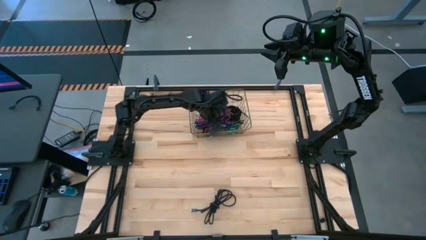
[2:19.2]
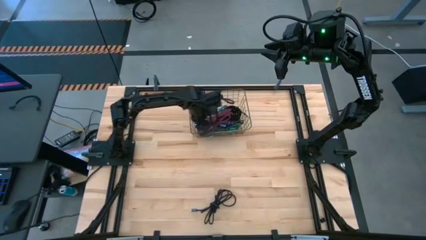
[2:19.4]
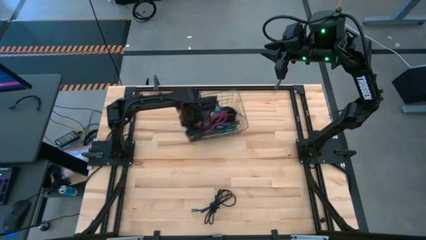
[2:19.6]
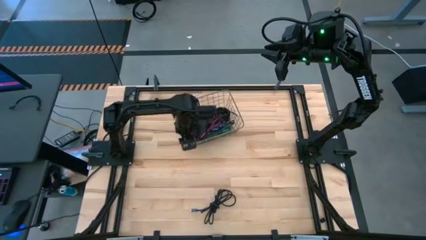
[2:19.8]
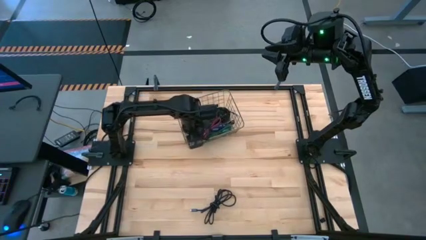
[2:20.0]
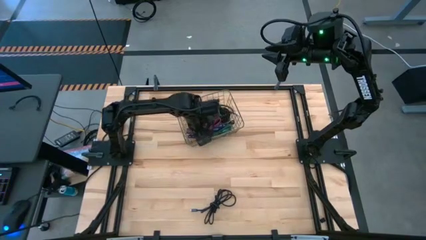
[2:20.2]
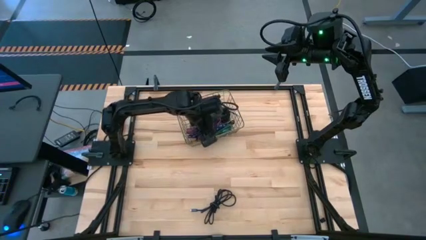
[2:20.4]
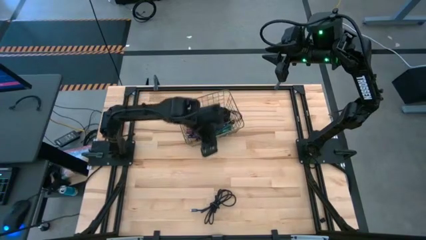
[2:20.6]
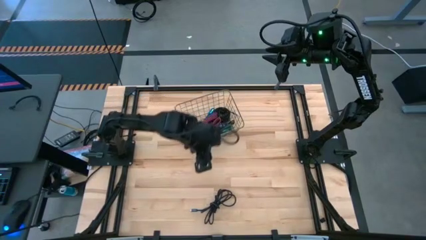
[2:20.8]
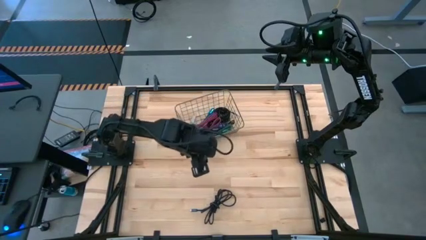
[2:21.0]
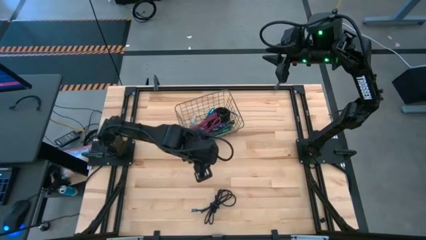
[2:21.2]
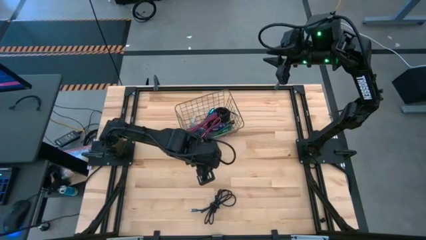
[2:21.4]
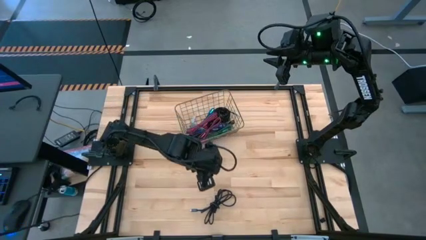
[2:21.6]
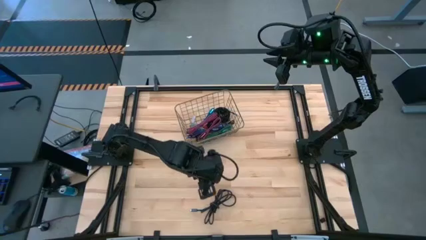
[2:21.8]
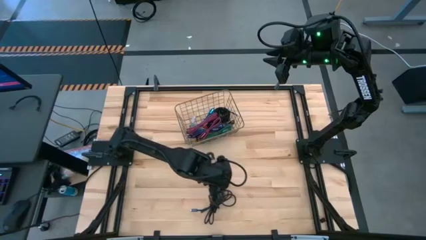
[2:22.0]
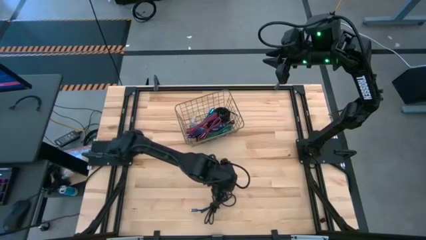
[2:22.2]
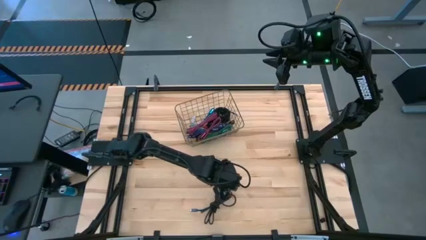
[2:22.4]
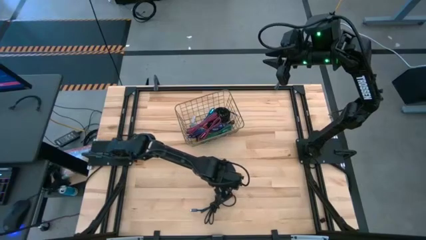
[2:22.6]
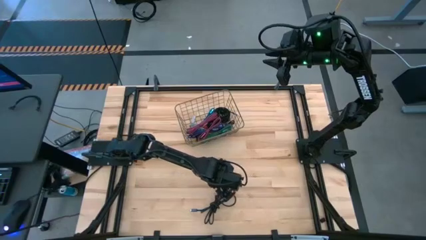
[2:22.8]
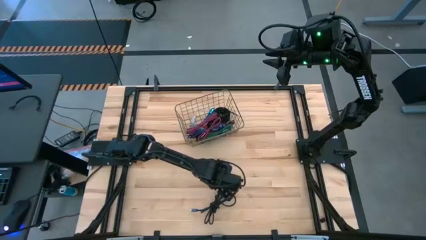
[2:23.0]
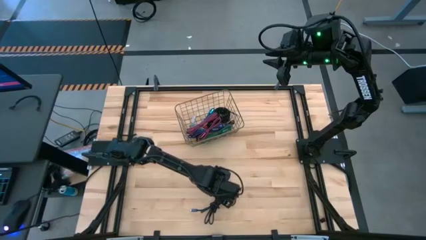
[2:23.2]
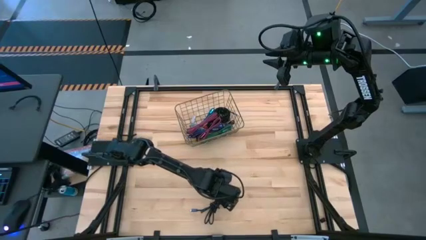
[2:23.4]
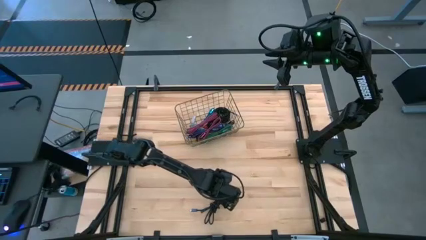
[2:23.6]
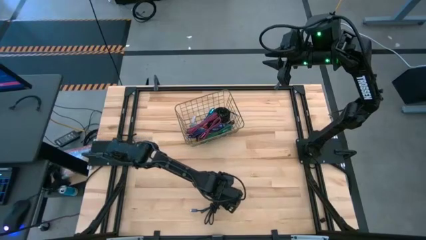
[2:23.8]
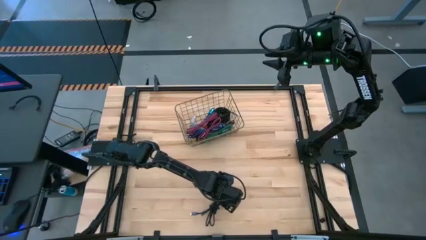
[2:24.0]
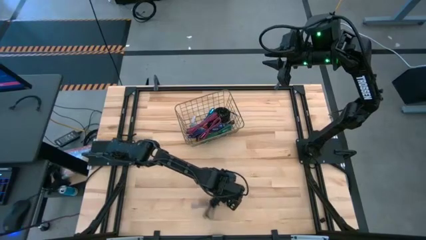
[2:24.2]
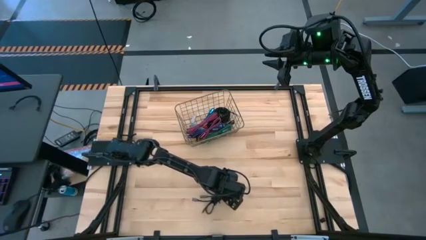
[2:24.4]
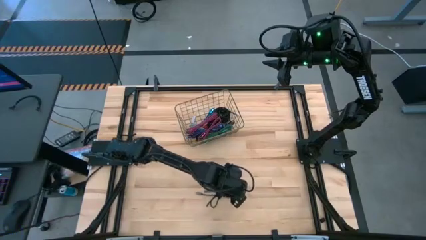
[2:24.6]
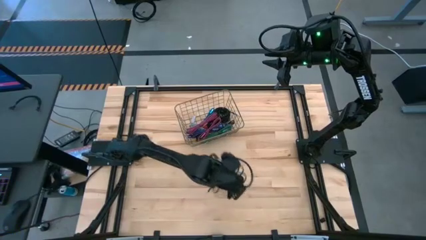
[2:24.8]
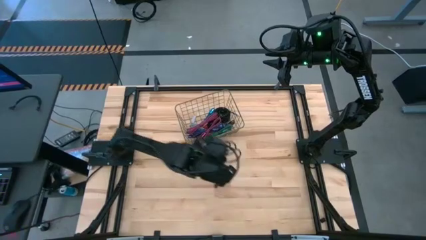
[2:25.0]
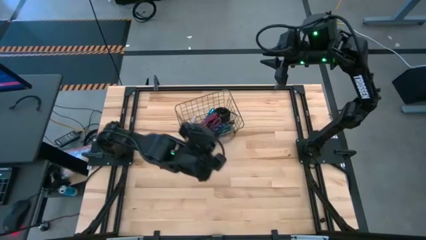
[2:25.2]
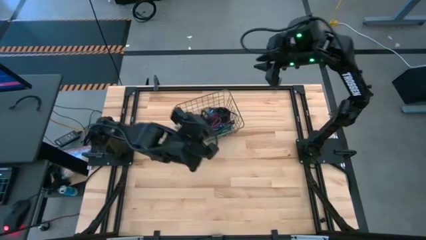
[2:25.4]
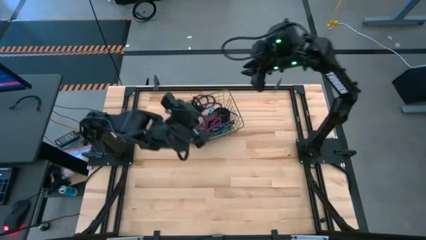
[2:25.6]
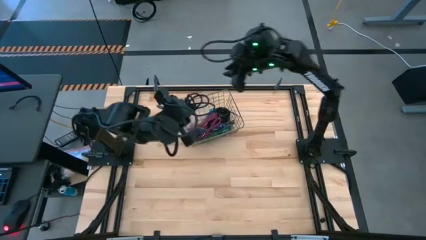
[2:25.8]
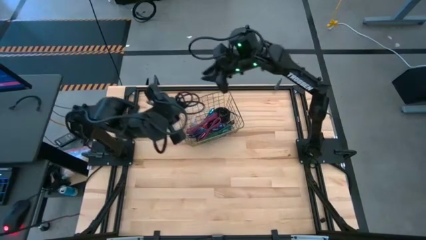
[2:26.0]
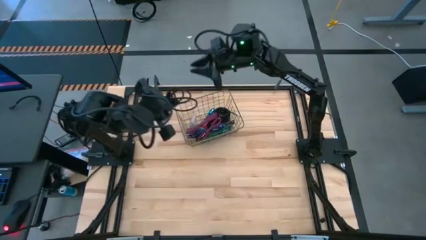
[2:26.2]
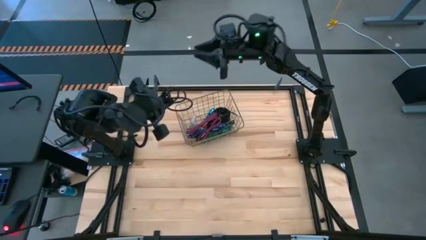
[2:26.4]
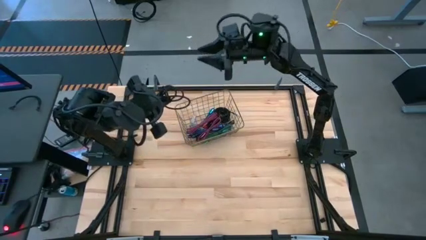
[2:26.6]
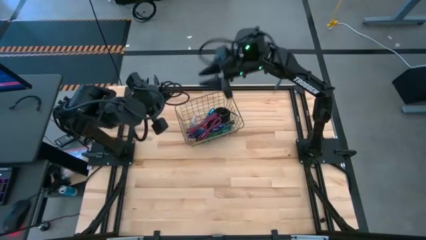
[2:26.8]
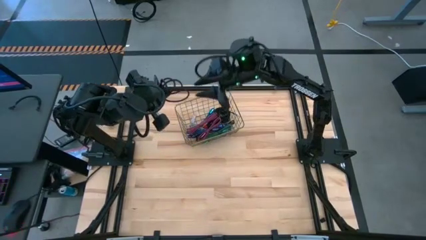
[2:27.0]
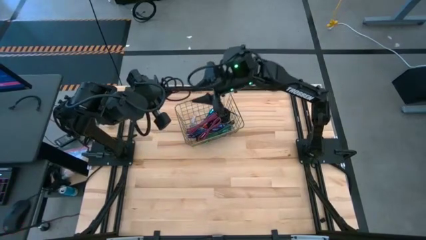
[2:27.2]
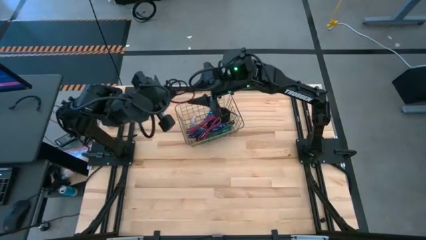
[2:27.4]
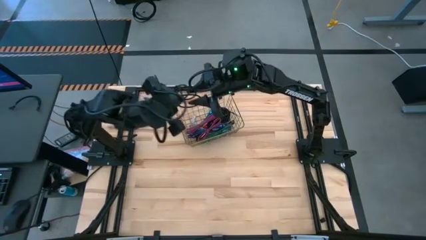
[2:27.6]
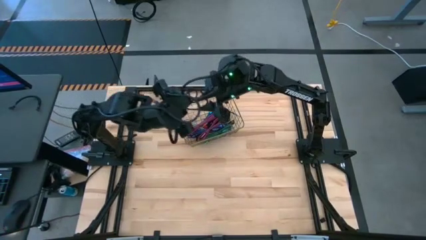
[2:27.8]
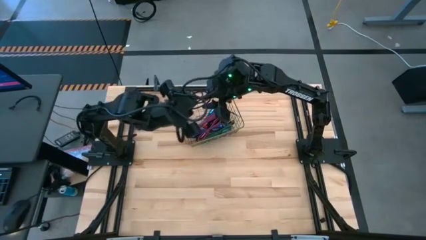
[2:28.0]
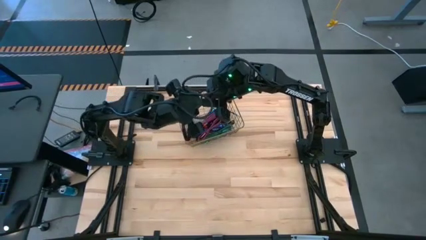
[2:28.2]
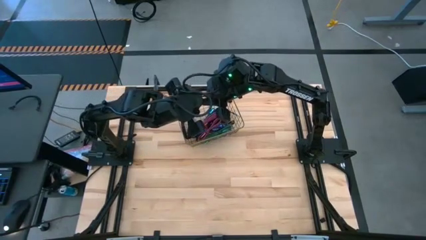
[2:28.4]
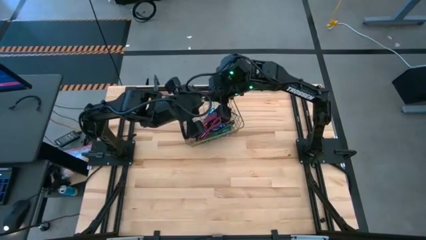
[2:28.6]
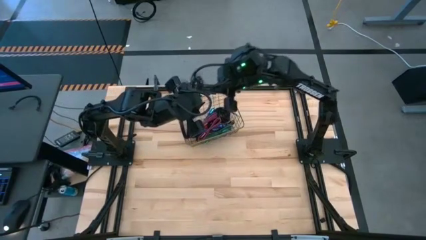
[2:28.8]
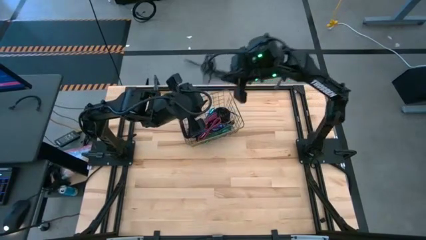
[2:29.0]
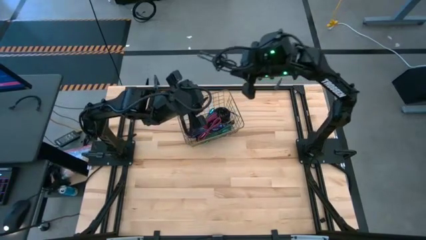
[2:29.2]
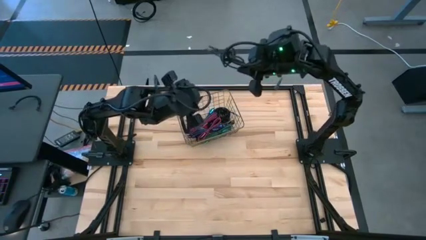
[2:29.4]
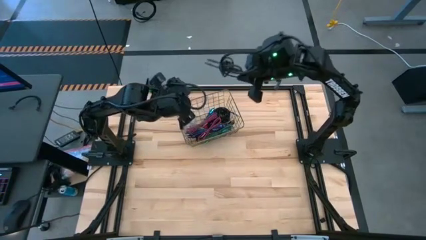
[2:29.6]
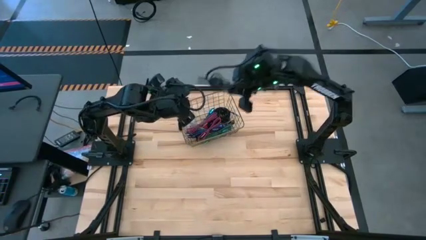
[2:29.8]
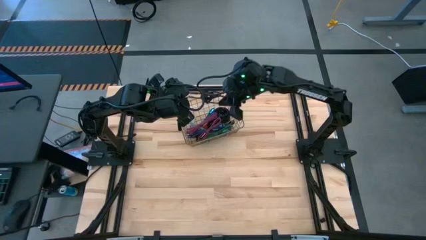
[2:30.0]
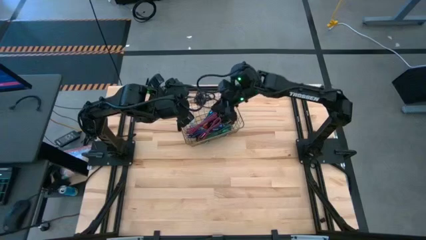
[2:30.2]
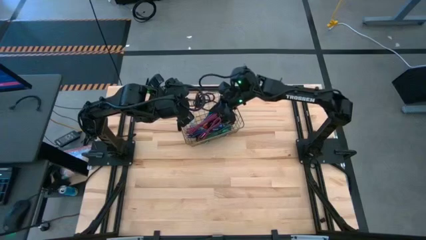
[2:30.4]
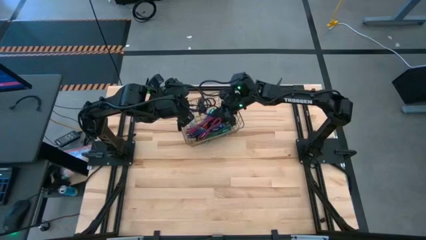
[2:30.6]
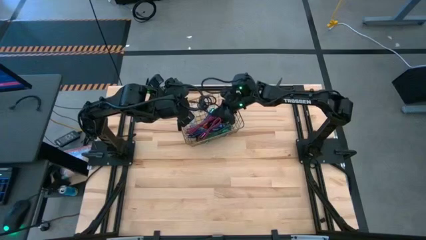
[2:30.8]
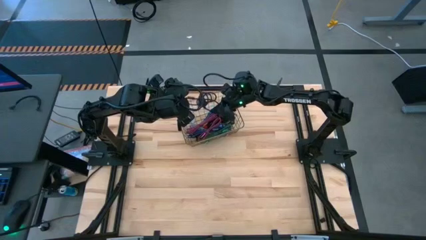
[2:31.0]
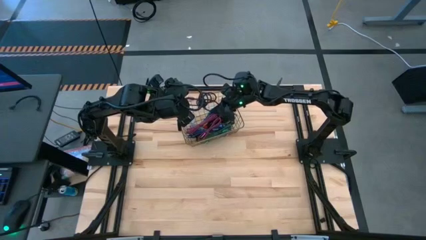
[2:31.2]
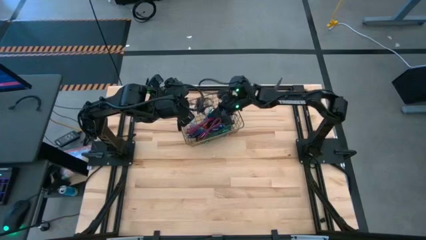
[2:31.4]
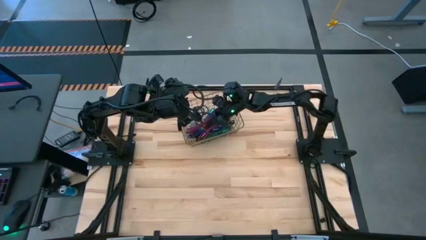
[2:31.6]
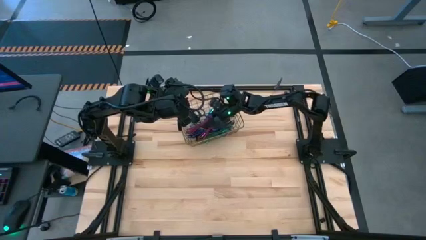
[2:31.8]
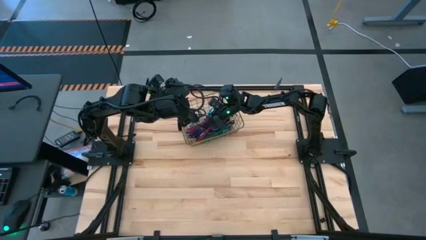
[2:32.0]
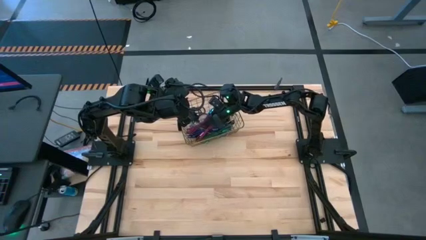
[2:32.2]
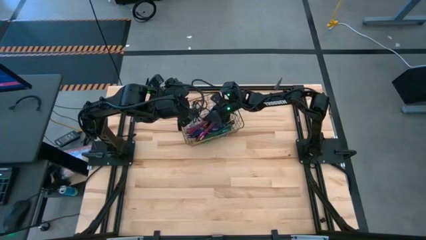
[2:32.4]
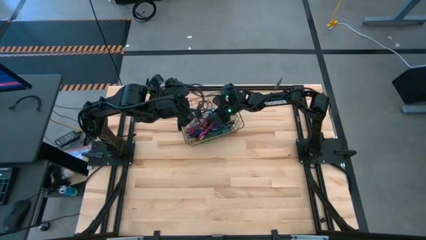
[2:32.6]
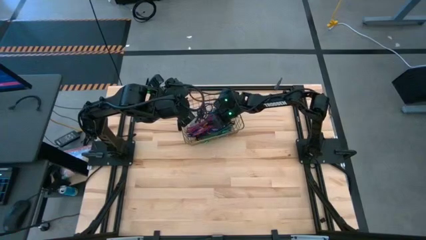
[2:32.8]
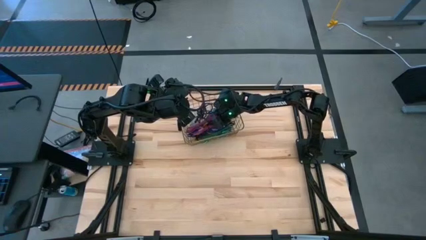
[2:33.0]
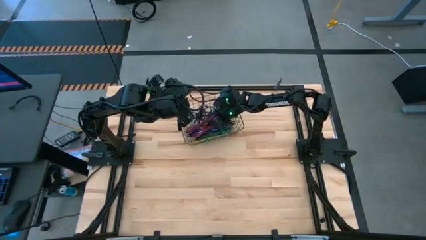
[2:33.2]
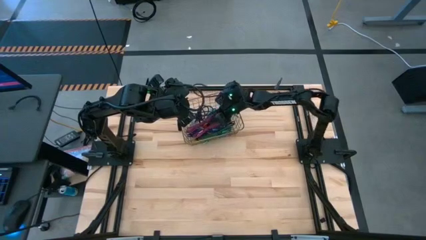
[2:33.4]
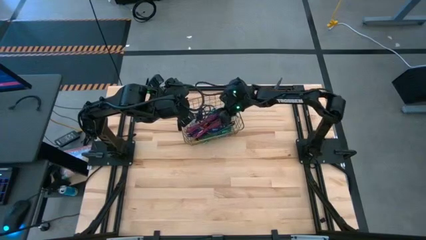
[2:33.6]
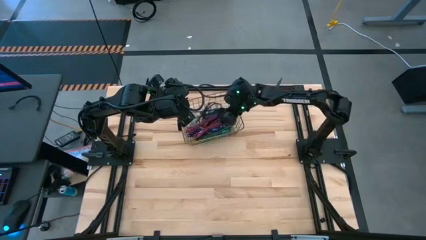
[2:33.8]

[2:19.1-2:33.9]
Task: Pick and place USB-C Cables
Put the black charger cable into the wire basket

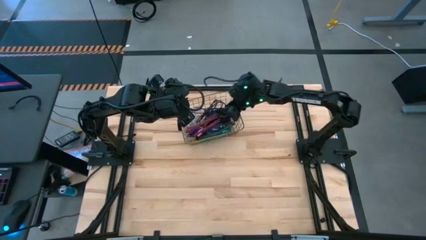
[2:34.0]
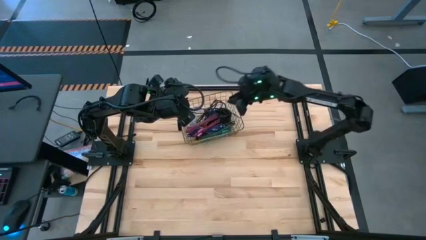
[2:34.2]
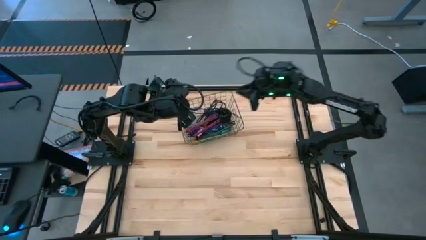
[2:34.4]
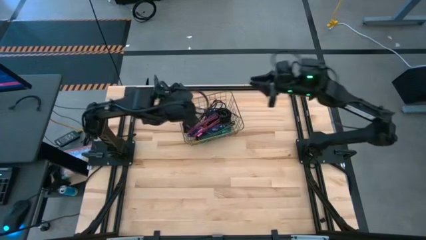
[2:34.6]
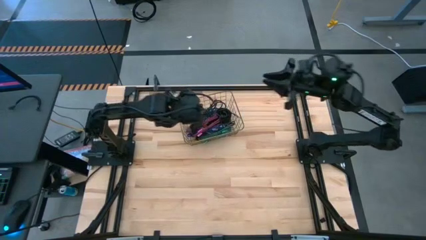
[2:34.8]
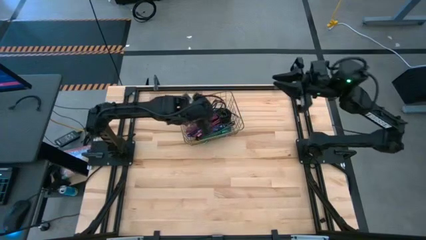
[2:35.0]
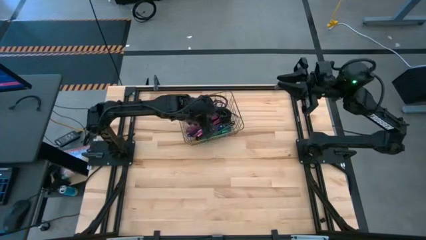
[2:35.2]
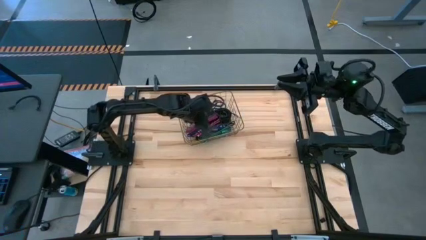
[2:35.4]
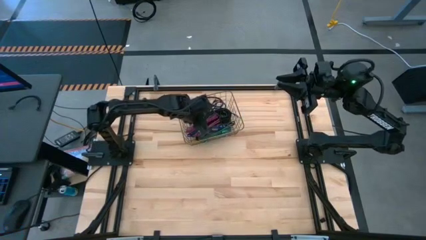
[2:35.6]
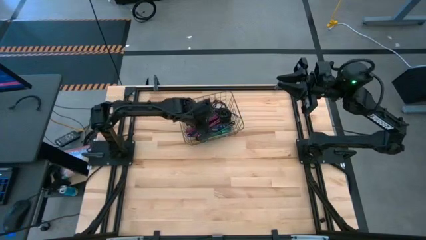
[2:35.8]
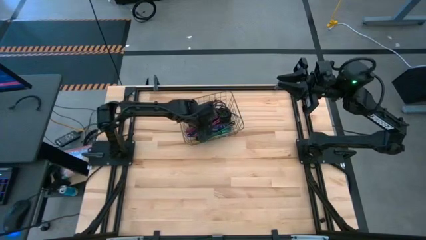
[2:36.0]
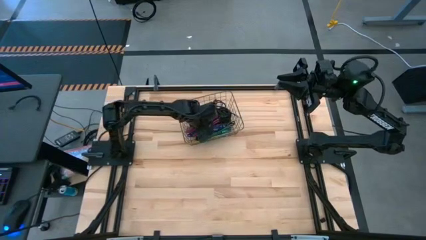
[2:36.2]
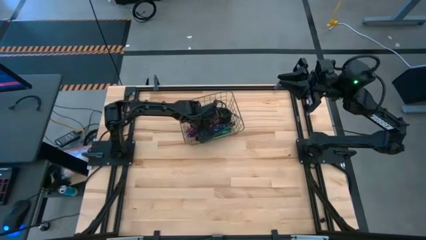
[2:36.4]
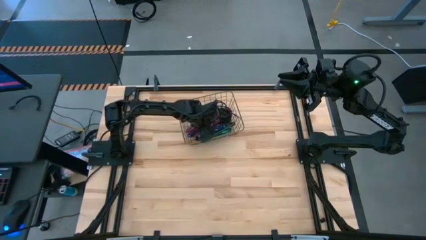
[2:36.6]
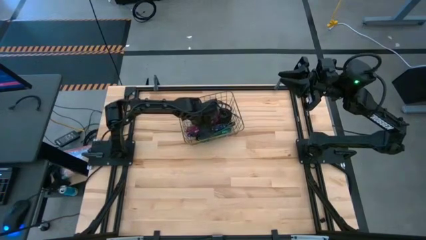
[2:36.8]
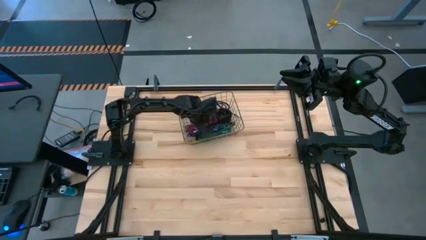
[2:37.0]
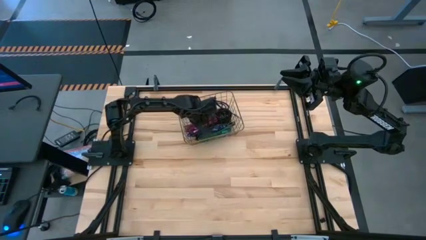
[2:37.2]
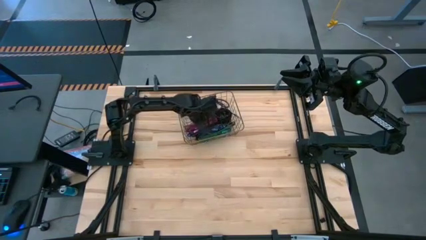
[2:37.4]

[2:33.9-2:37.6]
Adjust the pink charger cables
